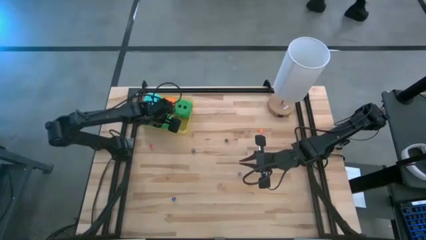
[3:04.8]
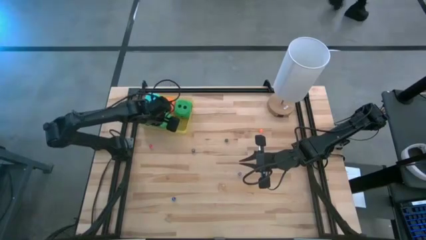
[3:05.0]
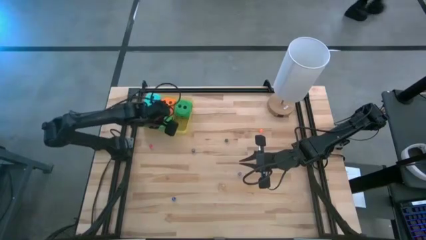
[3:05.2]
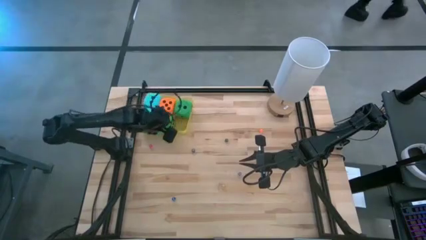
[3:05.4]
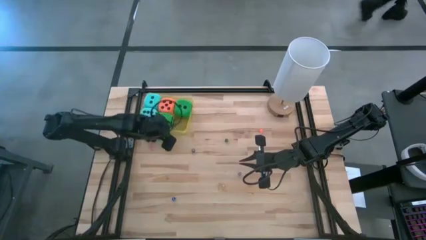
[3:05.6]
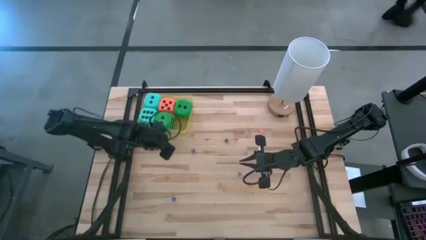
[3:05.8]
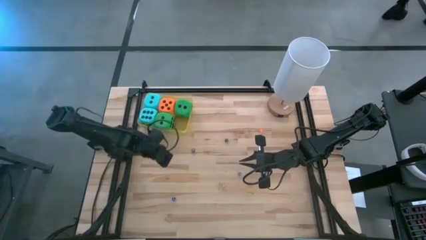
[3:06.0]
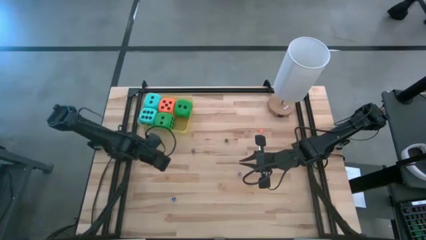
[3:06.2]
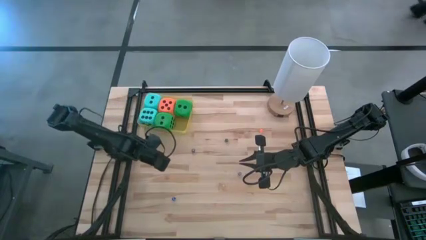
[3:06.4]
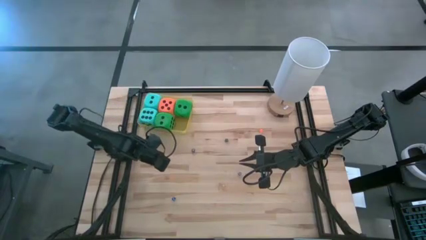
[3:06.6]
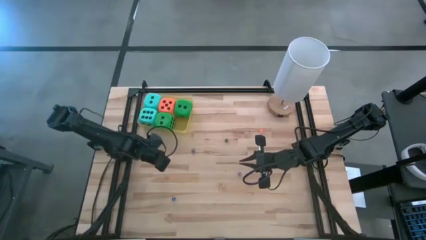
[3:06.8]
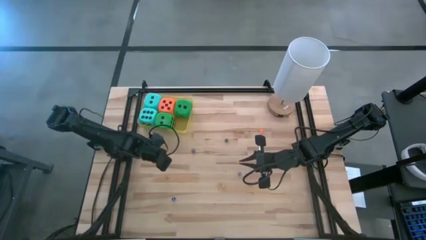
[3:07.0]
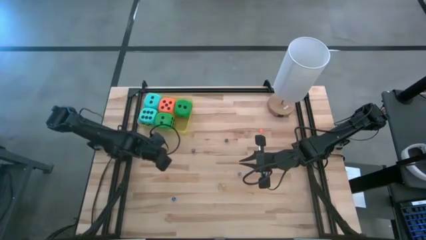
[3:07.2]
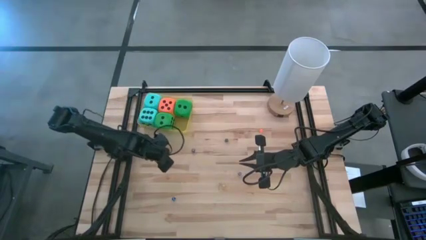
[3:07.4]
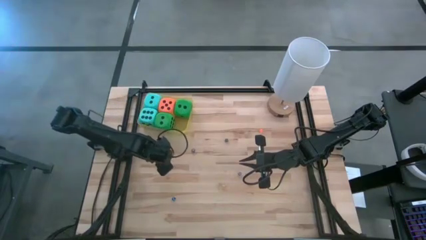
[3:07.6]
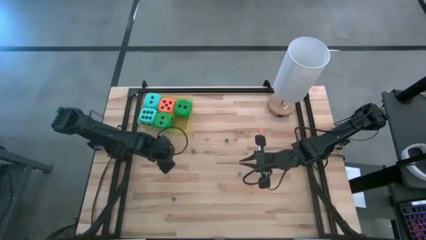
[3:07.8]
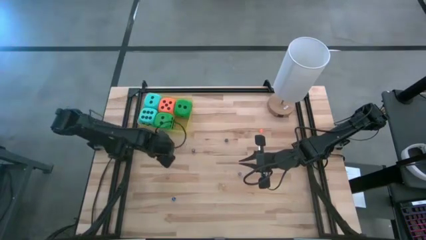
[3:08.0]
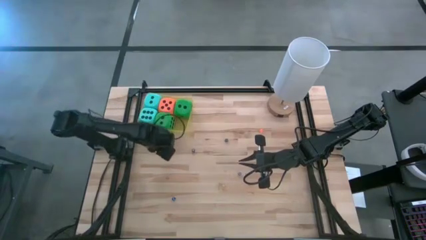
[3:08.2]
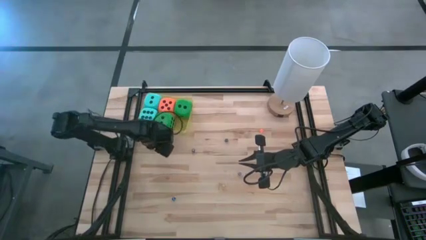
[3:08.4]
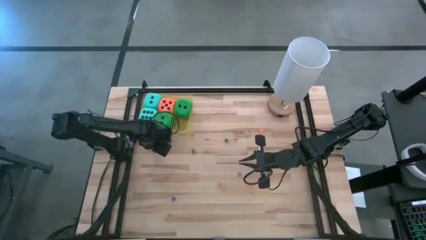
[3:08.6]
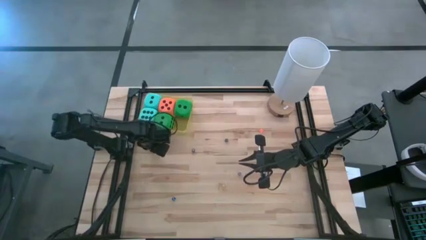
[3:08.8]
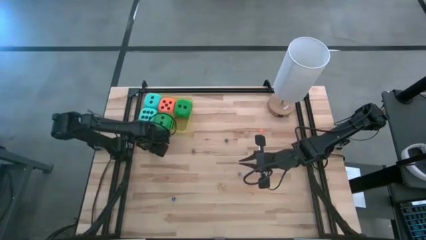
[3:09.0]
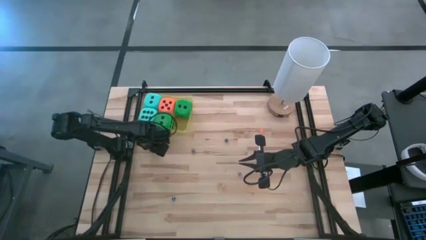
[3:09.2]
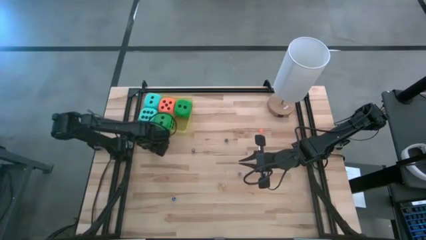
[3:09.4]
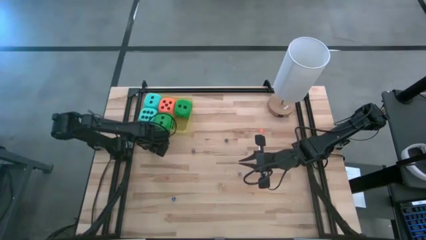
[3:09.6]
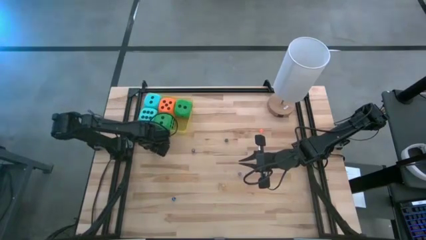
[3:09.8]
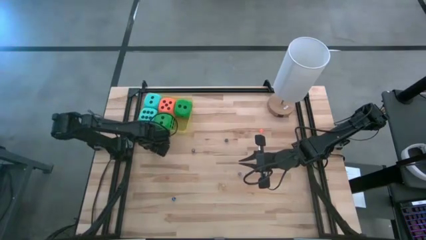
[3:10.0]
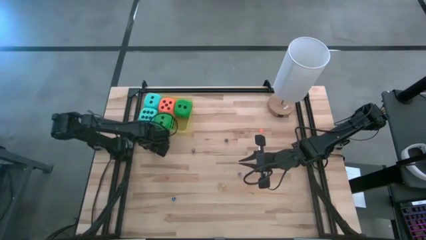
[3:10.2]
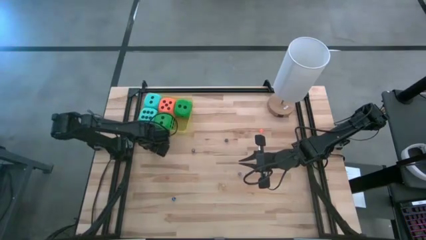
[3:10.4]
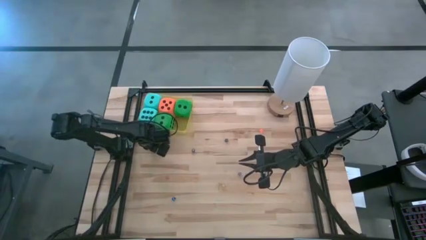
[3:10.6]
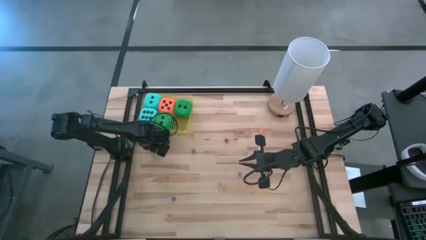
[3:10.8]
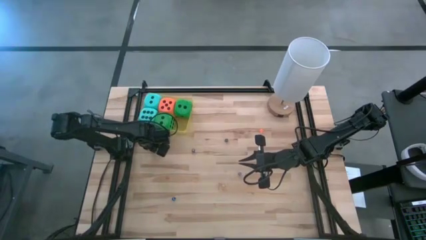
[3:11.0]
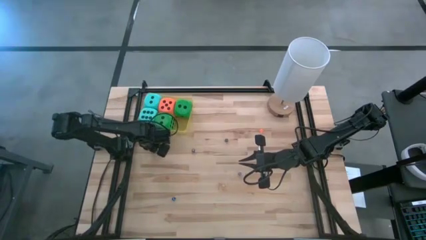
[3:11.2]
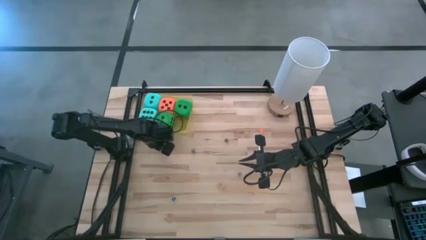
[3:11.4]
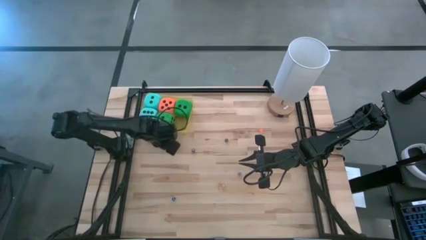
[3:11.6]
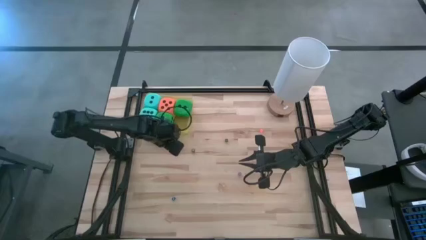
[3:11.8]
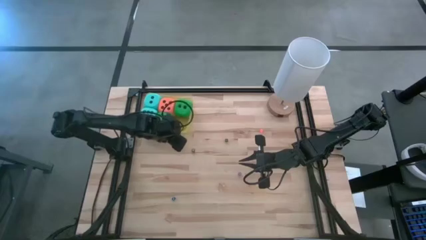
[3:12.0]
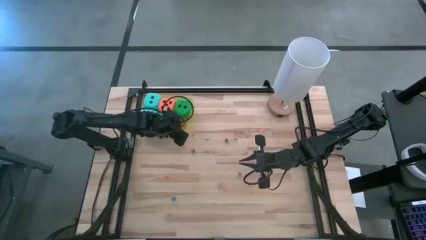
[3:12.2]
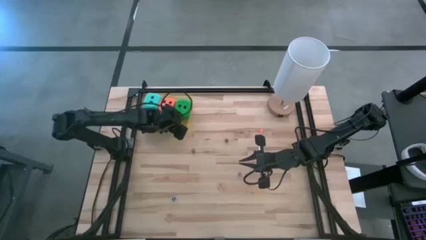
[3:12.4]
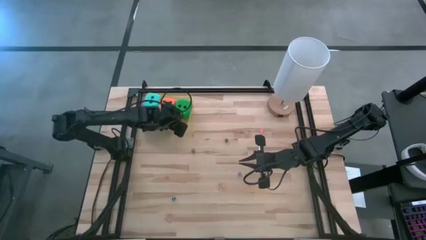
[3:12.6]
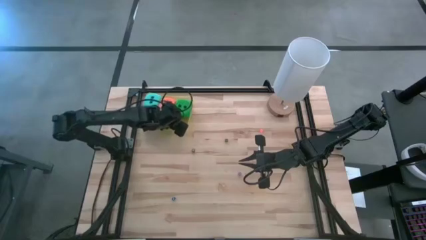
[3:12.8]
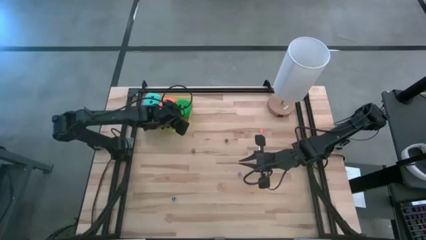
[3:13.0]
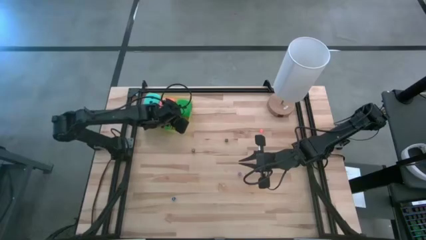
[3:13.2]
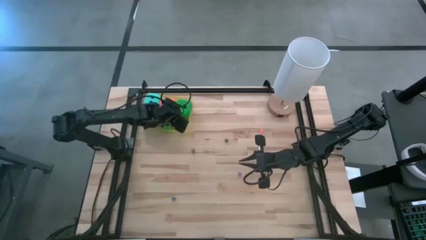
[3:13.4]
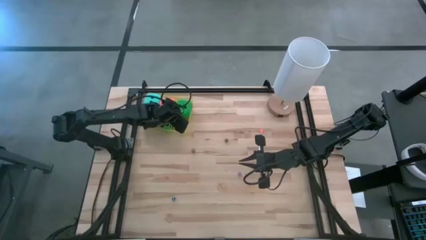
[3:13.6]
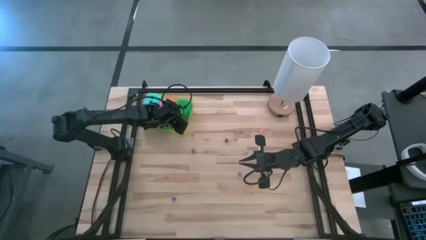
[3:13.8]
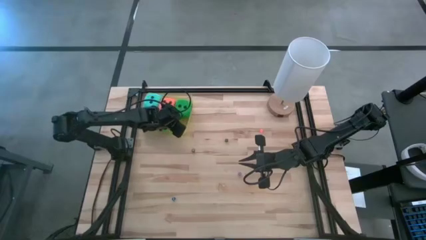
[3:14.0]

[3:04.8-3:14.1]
Task: Pick & Place Dice
Put the red small die into the yellow container

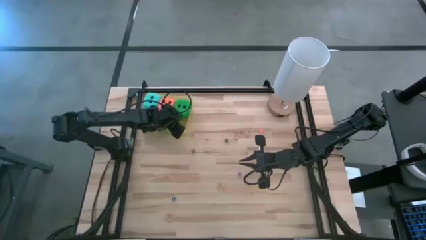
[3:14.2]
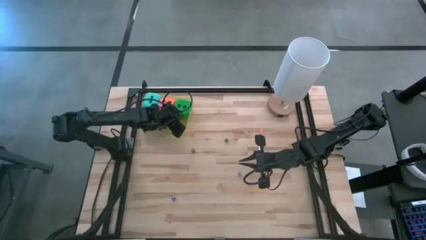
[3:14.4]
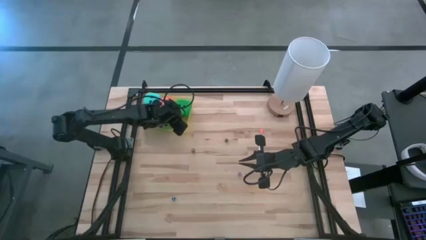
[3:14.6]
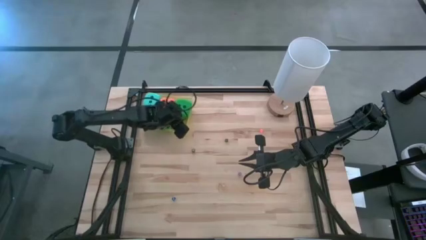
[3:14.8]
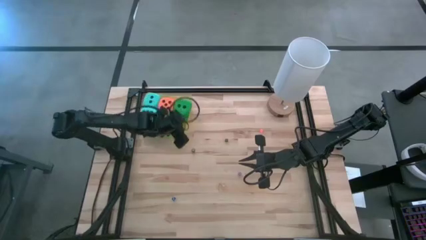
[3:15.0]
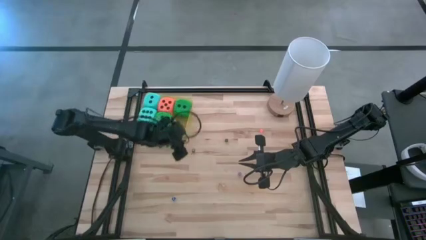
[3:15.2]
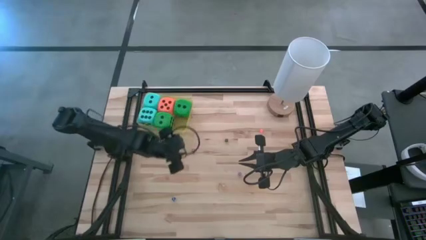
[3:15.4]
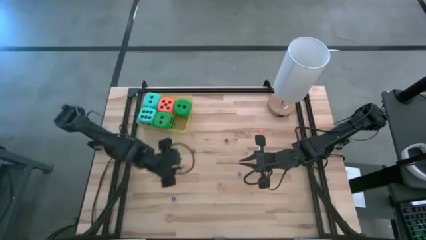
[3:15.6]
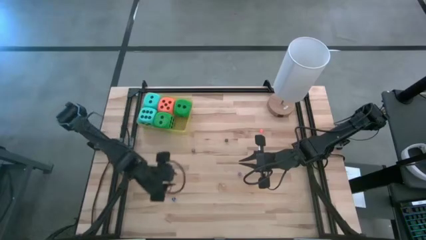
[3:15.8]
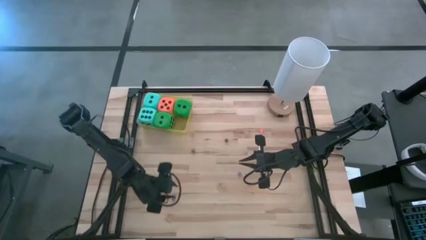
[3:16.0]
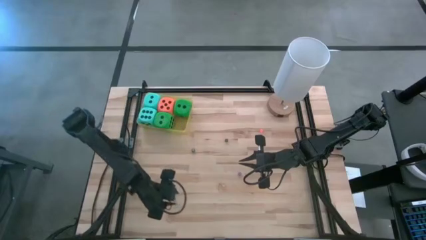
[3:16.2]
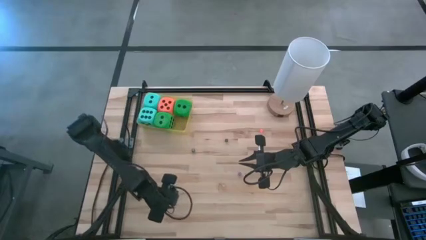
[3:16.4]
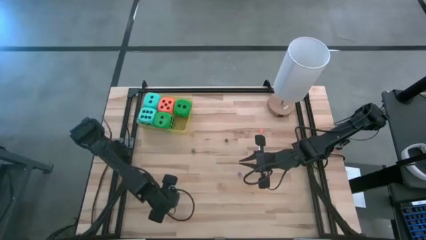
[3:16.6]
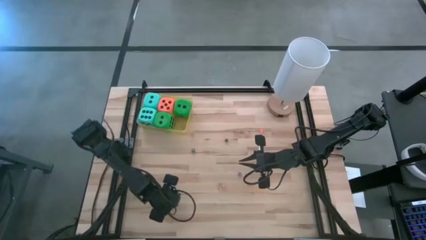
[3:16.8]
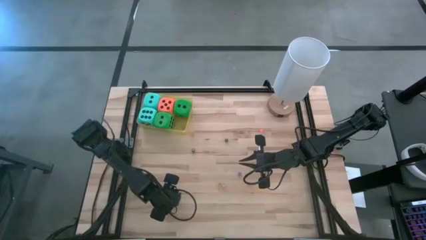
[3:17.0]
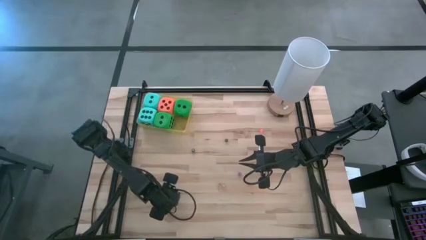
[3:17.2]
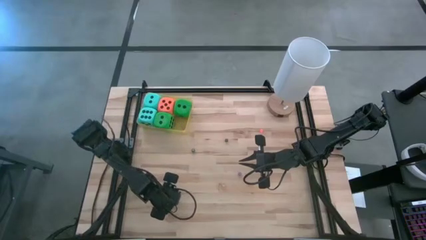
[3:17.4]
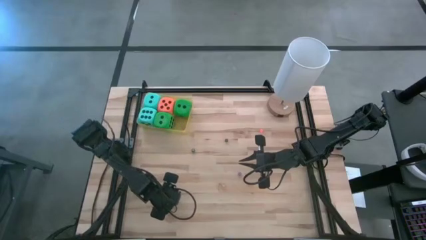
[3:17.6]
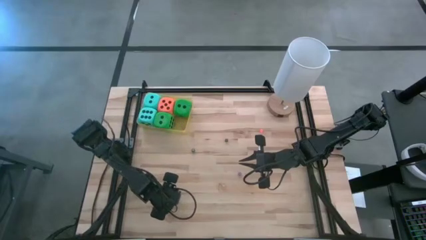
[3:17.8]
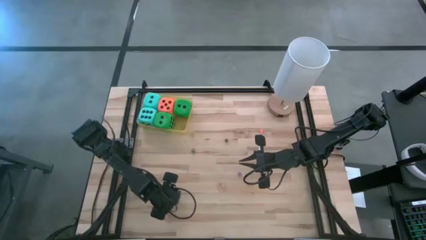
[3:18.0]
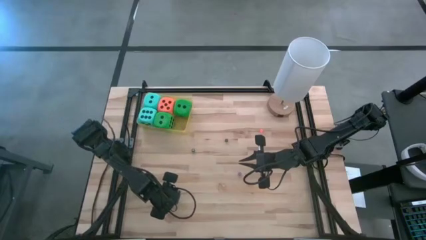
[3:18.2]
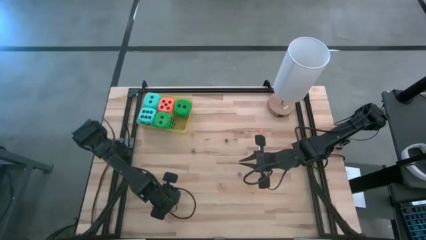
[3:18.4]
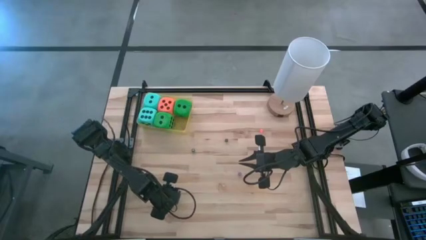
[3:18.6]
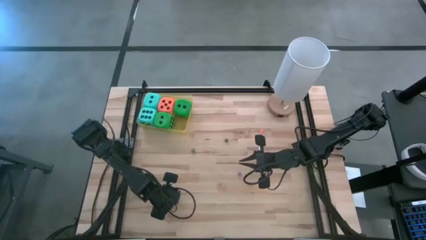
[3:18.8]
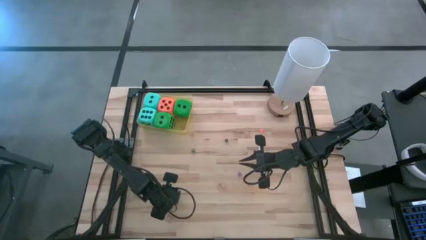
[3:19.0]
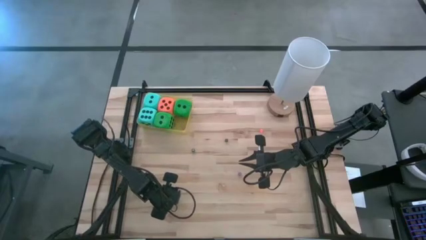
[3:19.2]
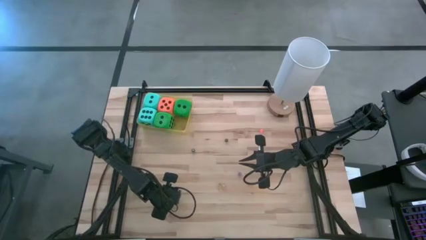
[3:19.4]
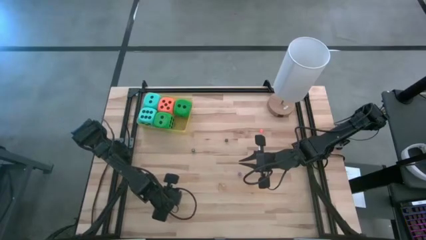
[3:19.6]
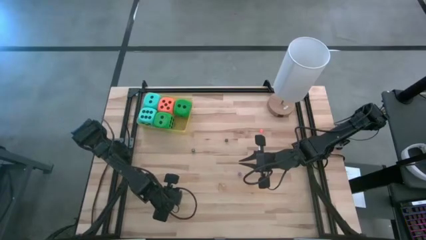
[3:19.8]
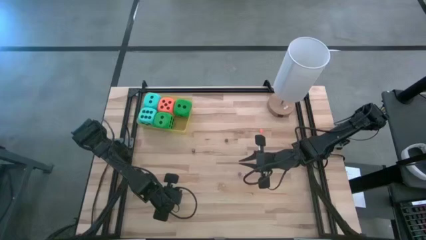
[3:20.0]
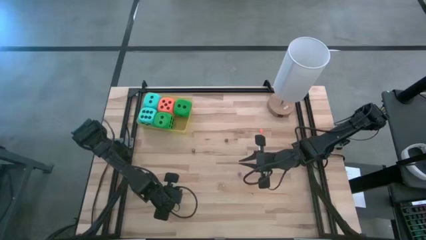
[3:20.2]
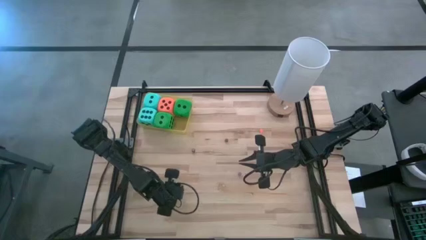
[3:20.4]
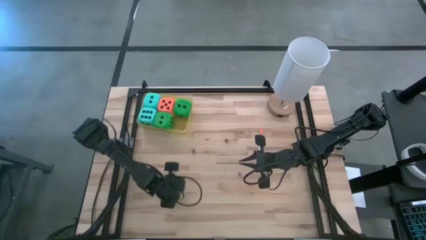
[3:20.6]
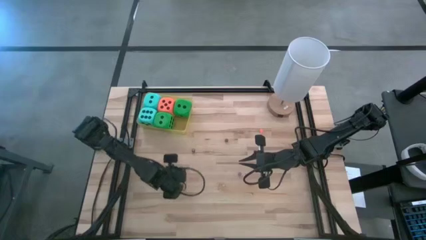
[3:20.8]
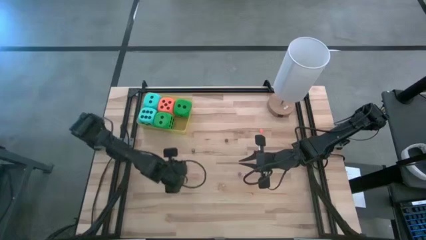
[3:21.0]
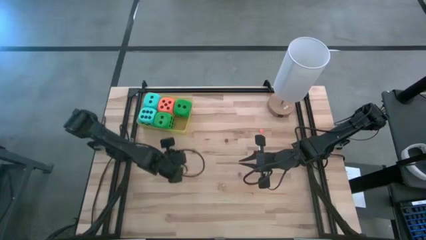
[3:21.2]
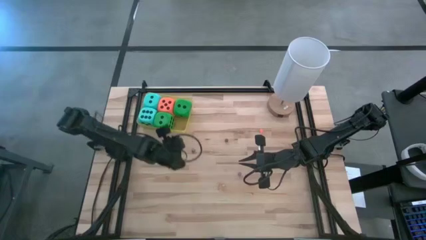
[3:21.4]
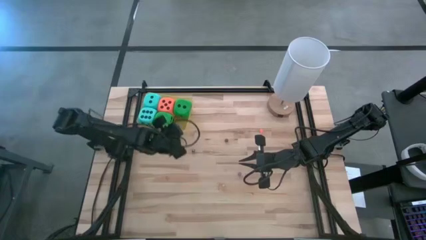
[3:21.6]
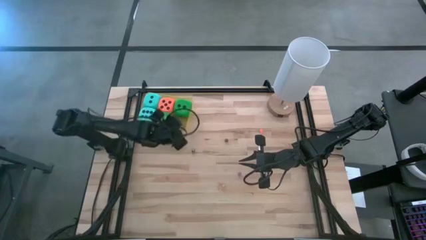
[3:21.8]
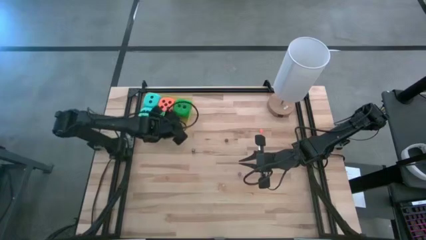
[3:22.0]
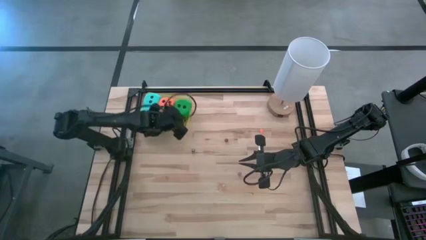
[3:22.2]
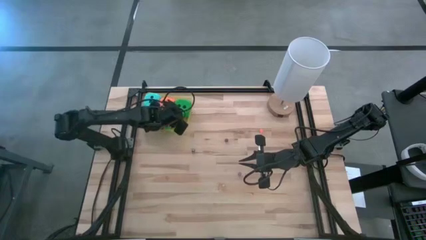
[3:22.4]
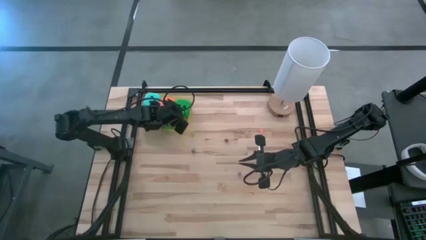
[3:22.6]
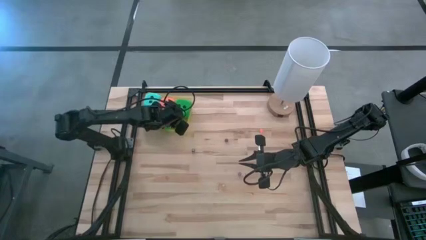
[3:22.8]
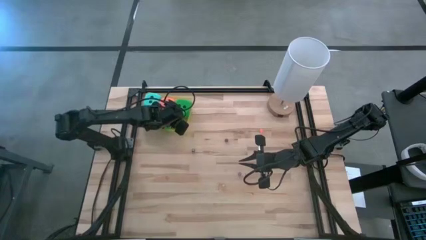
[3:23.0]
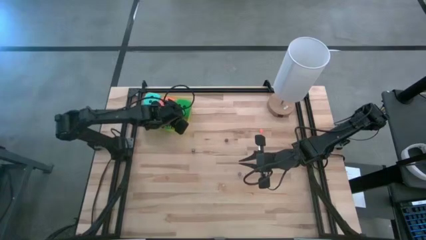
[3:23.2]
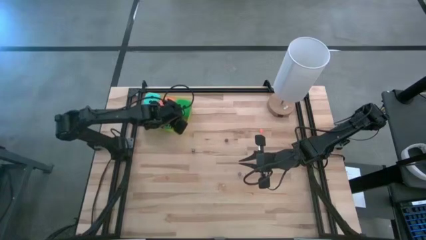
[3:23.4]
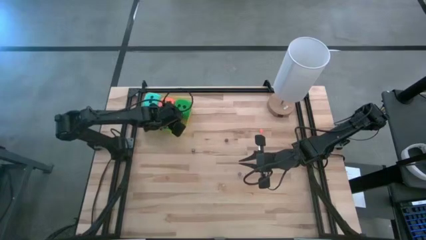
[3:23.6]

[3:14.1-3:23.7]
Put the blue small die into the yellow container
